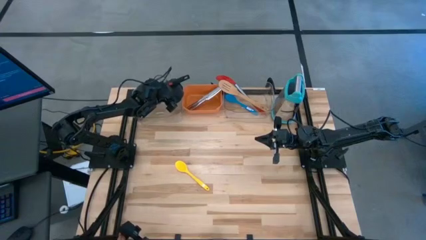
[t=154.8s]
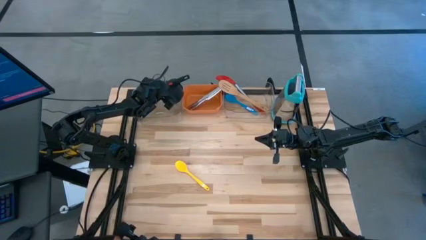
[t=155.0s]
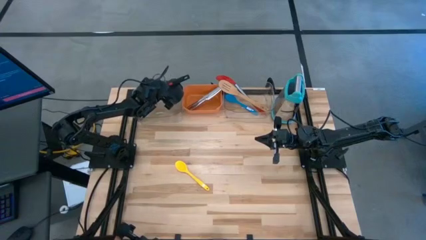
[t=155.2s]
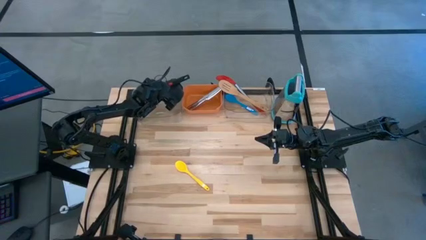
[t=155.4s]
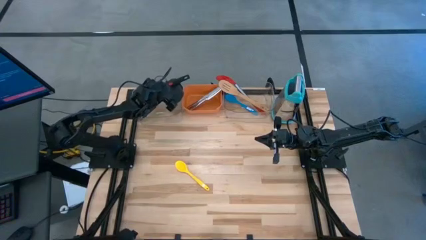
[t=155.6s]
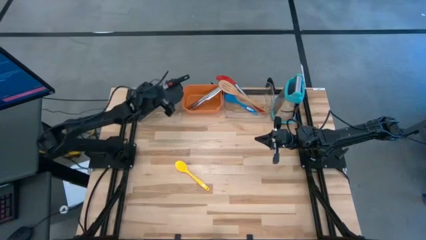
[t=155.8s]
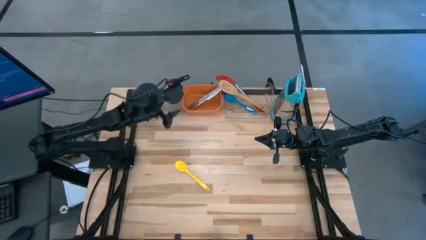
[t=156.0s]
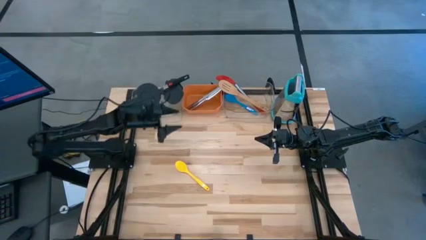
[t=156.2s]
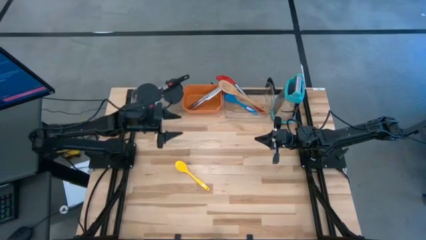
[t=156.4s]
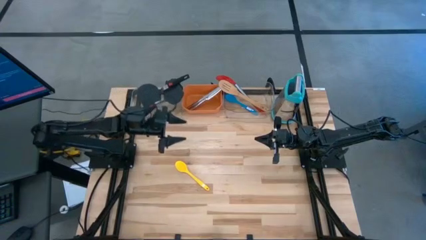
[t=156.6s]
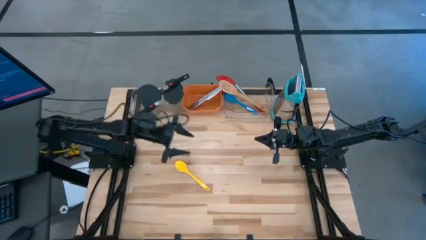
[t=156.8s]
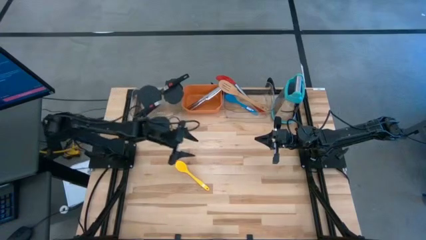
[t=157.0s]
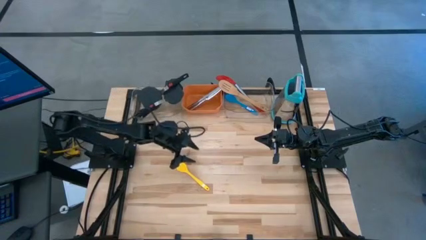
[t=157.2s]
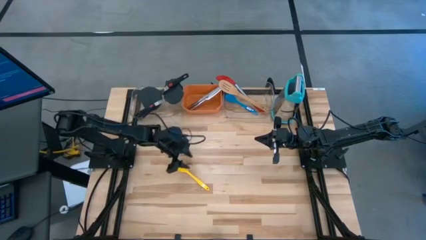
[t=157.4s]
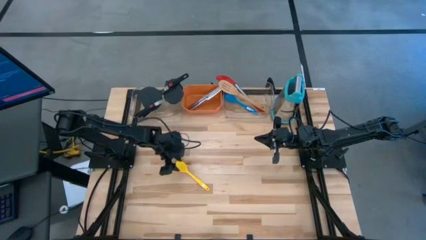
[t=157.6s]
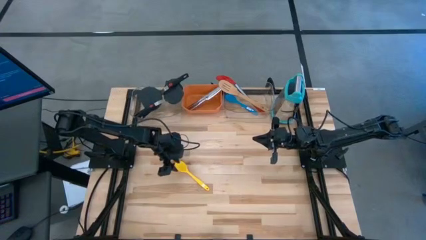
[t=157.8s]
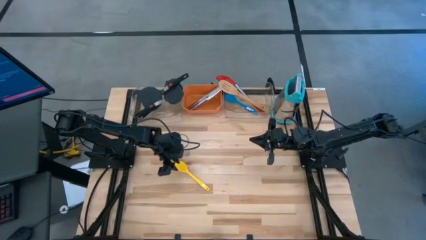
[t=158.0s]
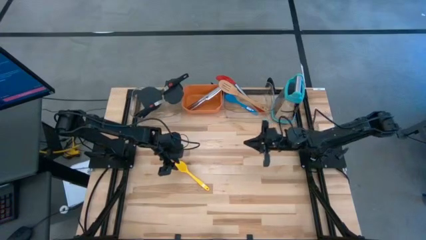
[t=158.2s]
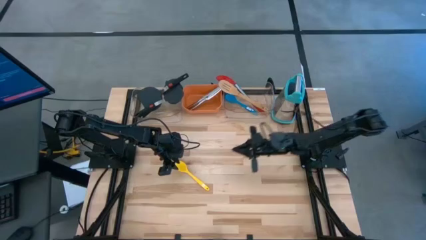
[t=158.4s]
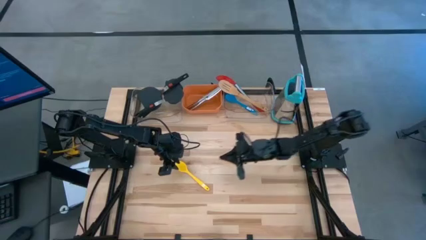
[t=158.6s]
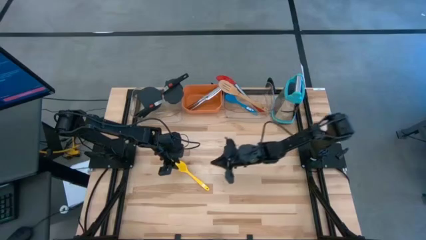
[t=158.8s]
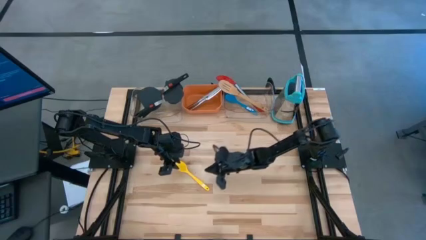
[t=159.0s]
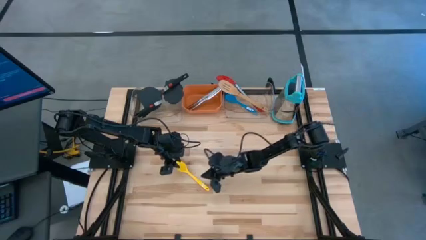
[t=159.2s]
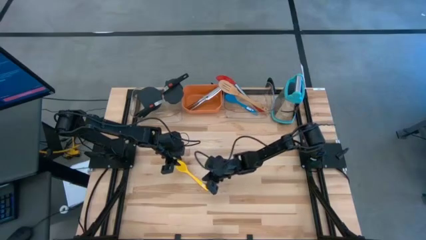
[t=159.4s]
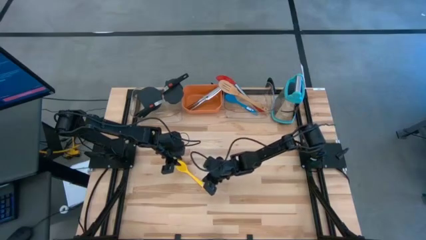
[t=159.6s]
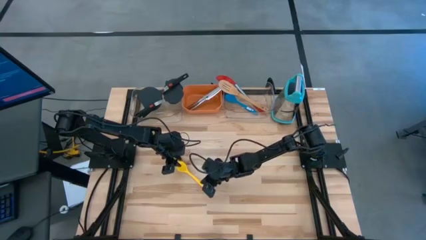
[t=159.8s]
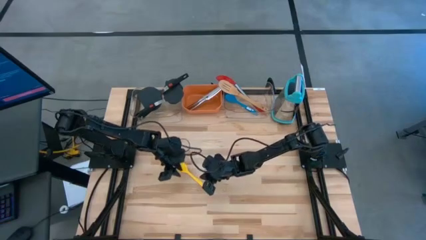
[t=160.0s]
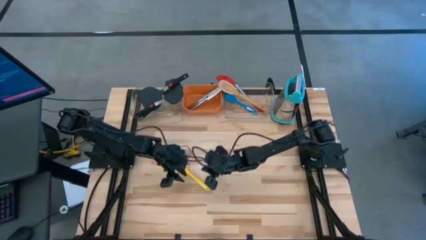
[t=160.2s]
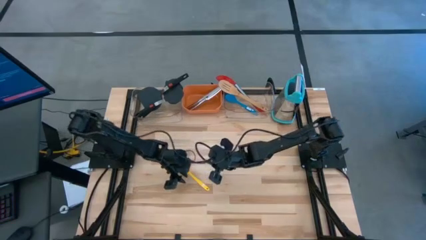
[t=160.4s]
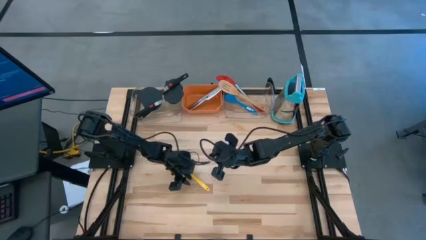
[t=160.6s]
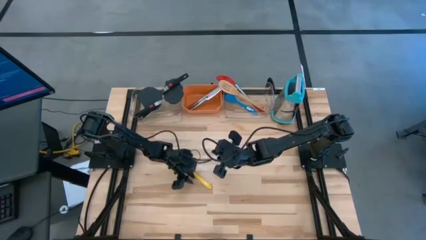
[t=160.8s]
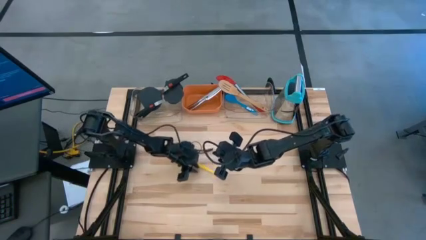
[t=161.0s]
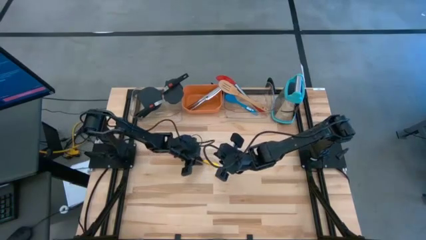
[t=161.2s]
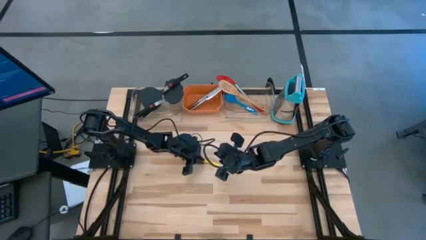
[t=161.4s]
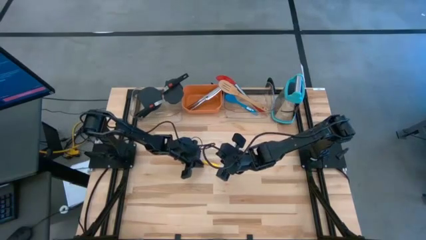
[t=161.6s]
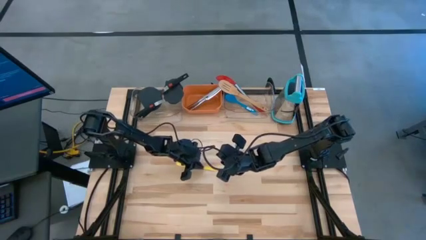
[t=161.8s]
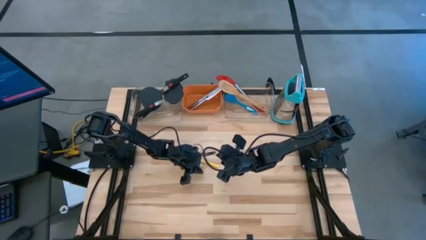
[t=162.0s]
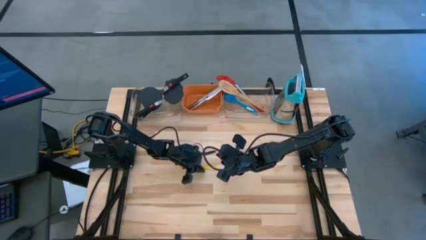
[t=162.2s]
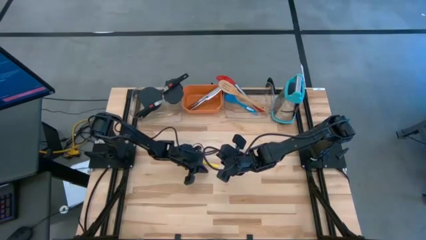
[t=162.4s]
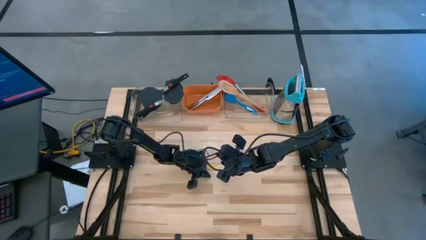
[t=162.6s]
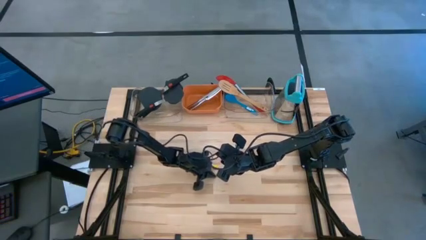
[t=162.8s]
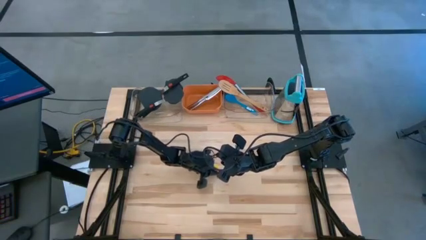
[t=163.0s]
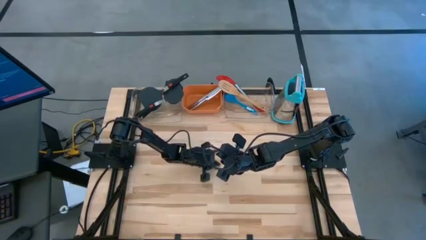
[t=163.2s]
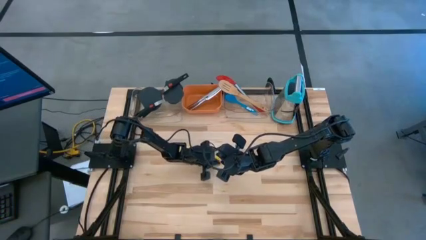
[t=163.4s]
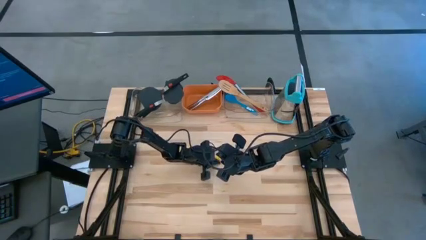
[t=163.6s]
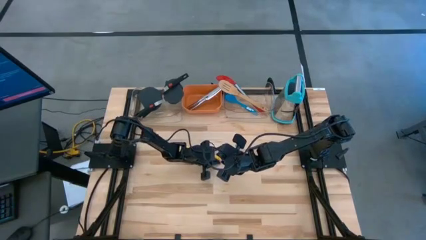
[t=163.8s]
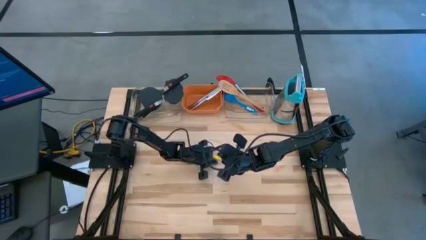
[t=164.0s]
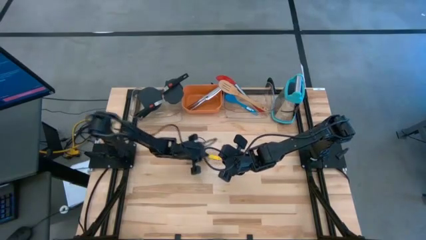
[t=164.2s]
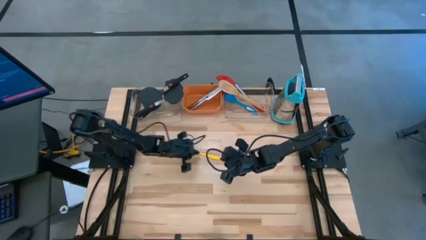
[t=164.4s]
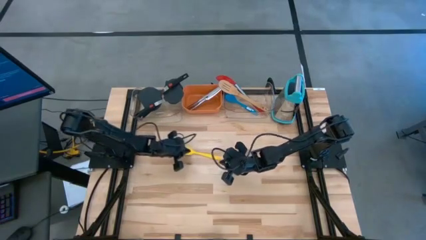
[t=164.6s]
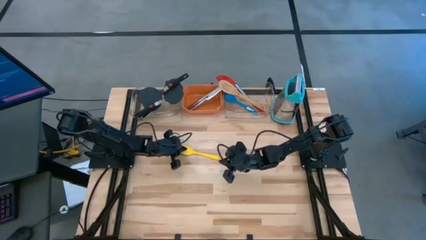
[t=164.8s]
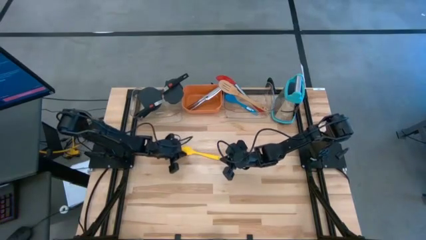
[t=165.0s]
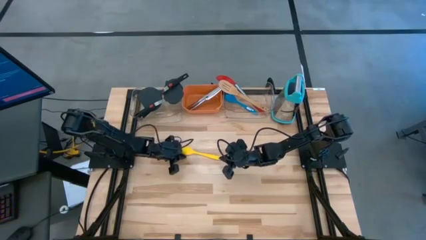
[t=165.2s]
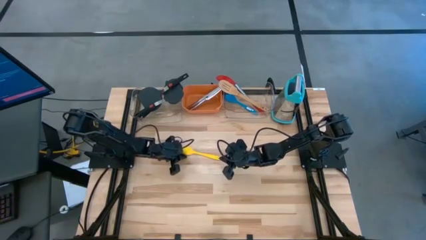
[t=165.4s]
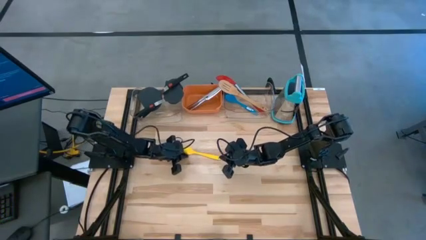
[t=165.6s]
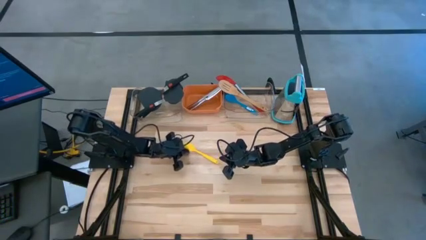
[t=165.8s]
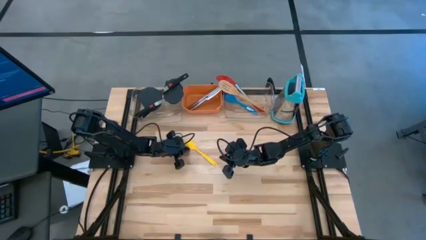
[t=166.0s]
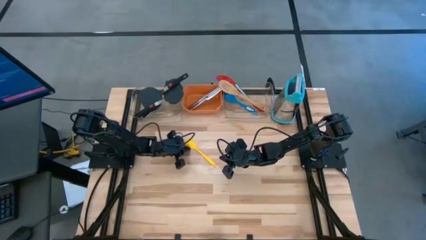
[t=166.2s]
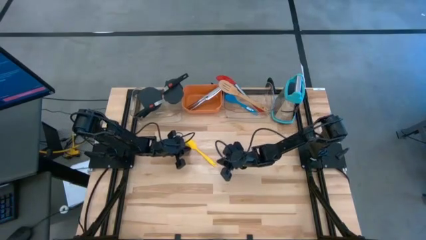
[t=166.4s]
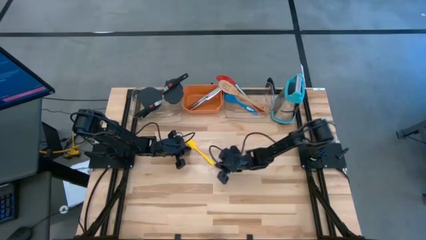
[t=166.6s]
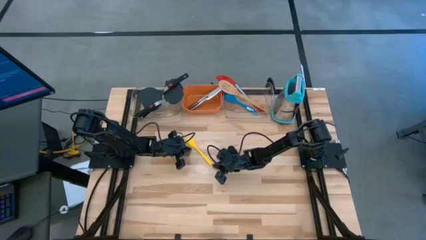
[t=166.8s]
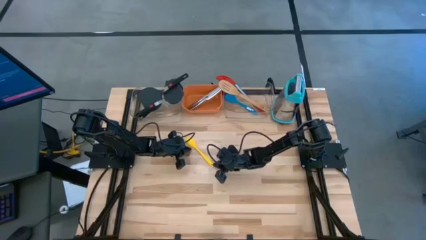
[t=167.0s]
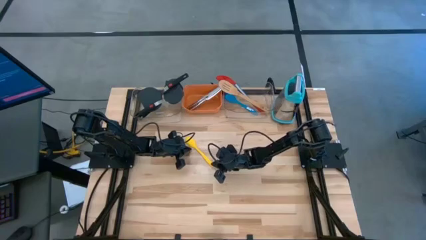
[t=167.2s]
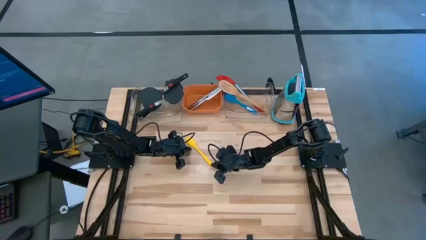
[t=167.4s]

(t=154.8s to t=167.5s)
Task: Pick & Place Kitchen Items
Put the yellow serving spoon into the right transparent bin
